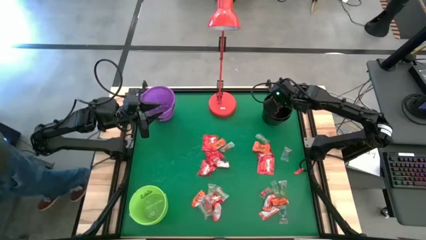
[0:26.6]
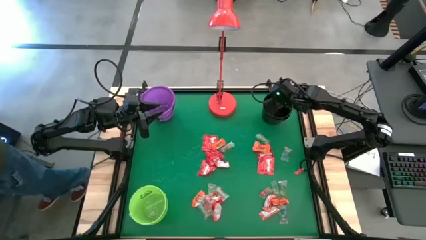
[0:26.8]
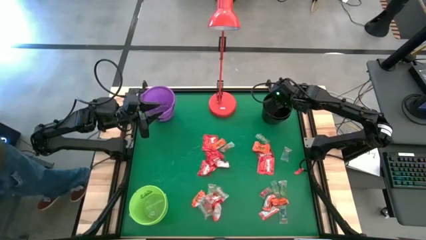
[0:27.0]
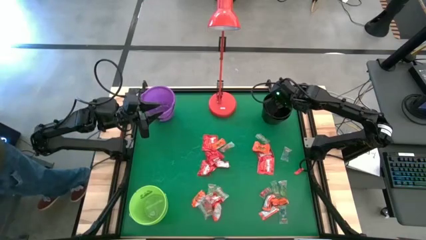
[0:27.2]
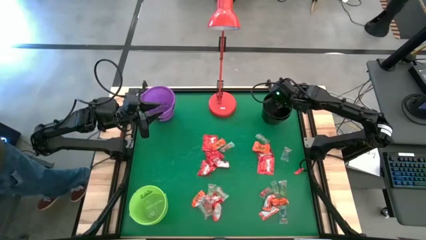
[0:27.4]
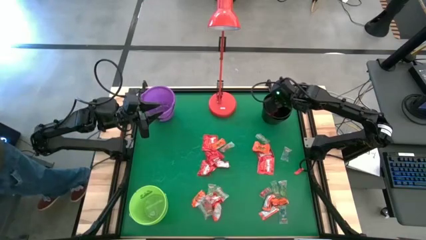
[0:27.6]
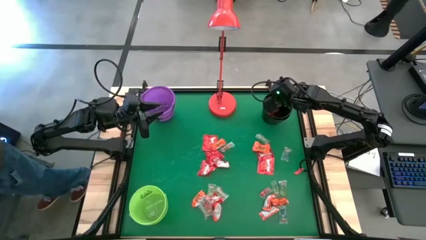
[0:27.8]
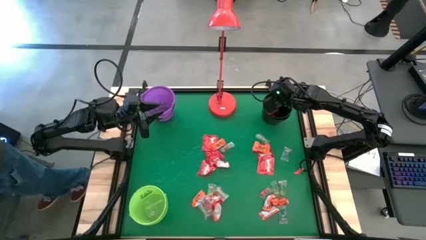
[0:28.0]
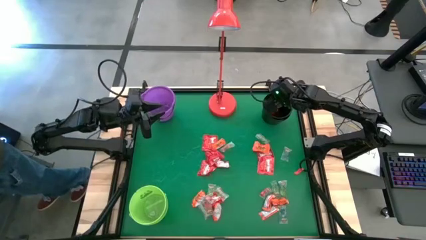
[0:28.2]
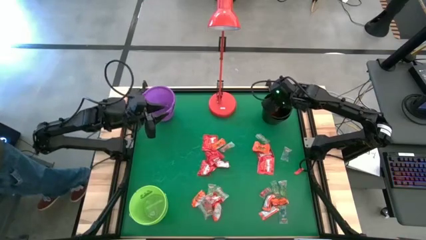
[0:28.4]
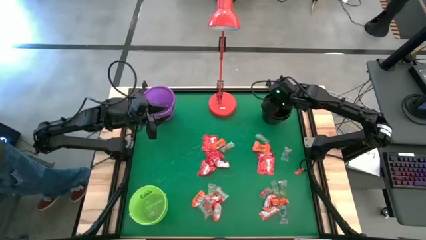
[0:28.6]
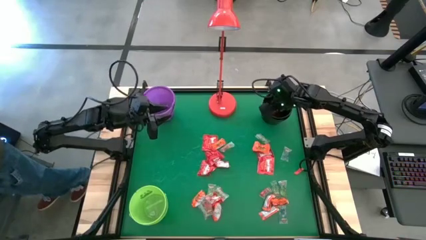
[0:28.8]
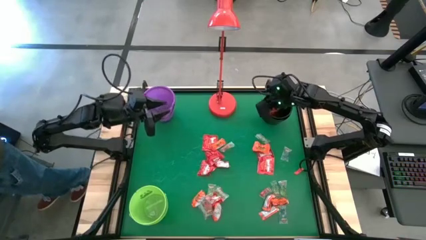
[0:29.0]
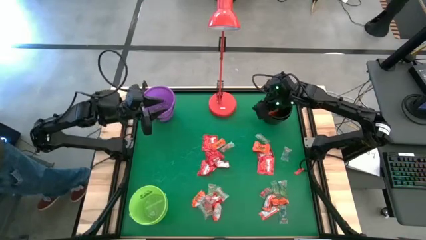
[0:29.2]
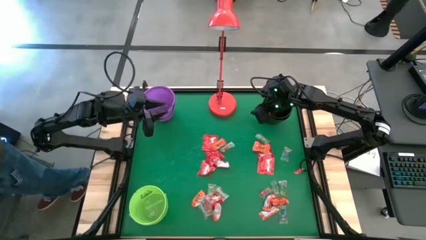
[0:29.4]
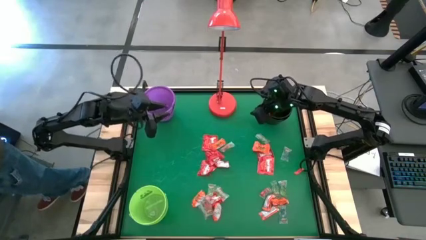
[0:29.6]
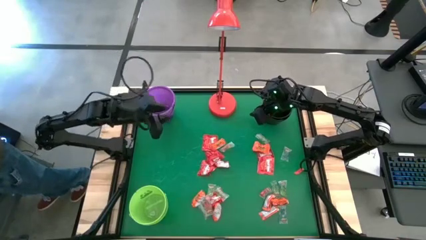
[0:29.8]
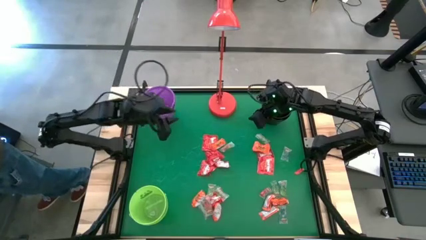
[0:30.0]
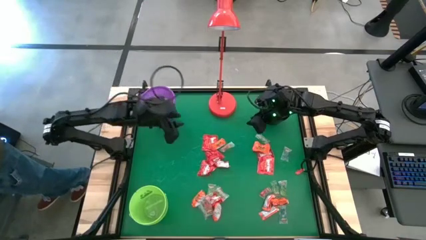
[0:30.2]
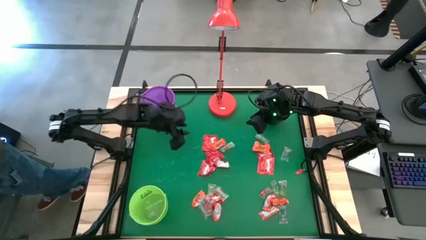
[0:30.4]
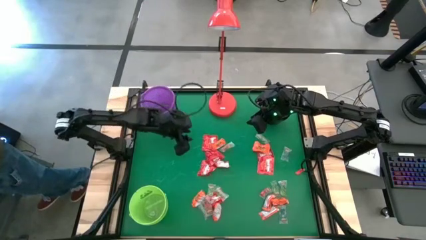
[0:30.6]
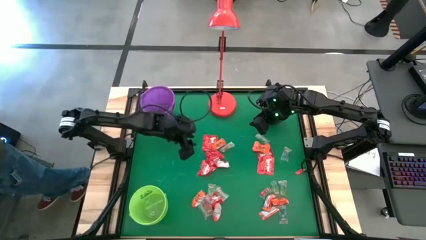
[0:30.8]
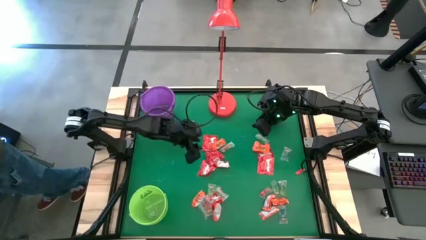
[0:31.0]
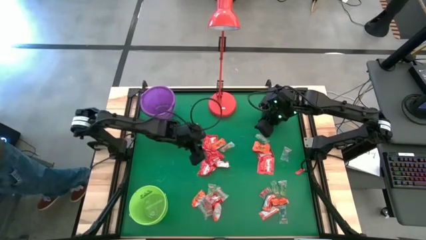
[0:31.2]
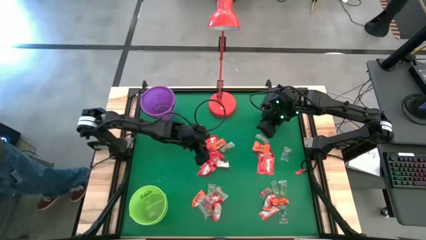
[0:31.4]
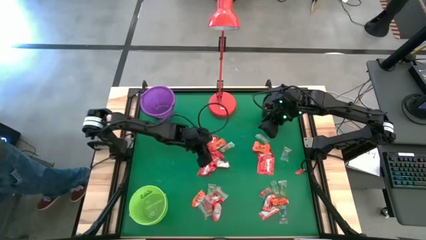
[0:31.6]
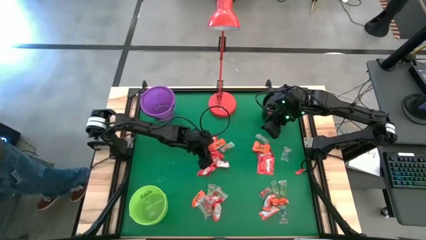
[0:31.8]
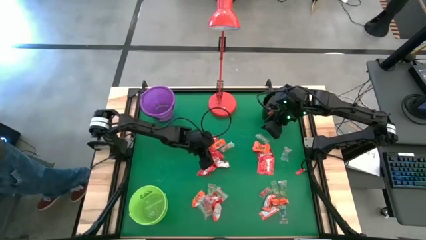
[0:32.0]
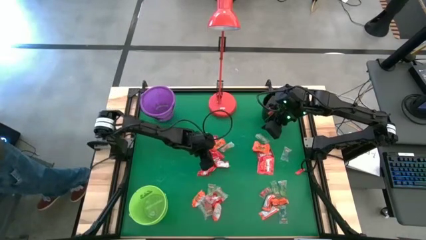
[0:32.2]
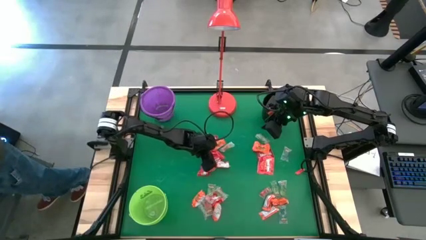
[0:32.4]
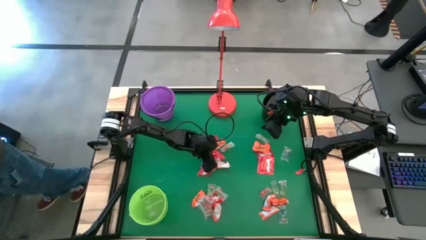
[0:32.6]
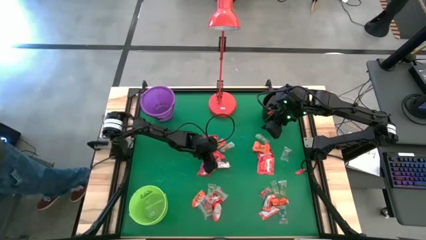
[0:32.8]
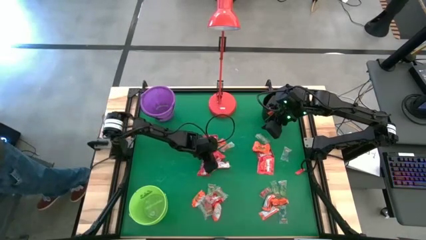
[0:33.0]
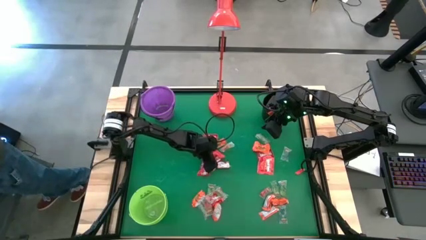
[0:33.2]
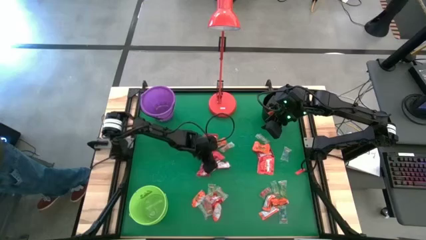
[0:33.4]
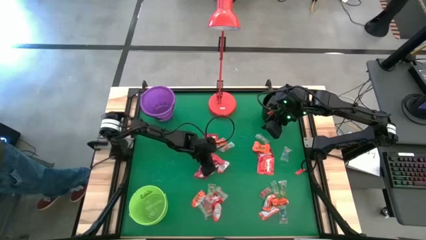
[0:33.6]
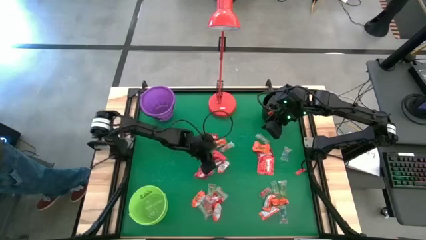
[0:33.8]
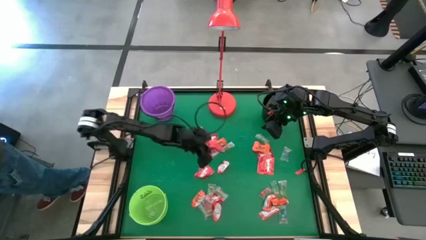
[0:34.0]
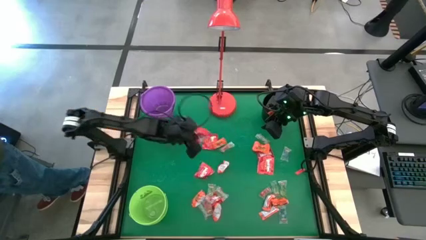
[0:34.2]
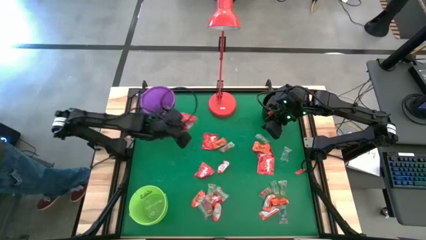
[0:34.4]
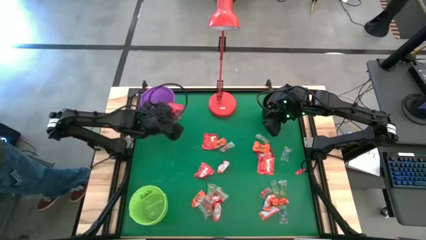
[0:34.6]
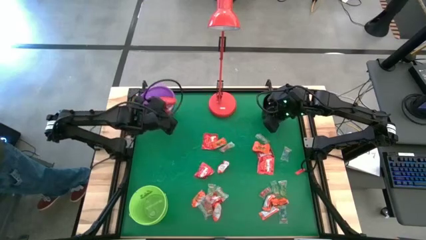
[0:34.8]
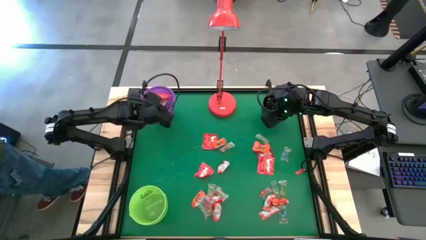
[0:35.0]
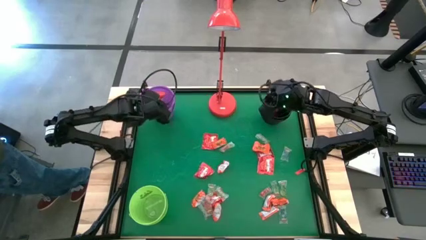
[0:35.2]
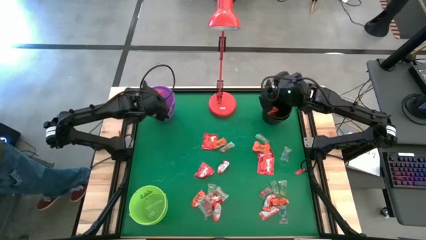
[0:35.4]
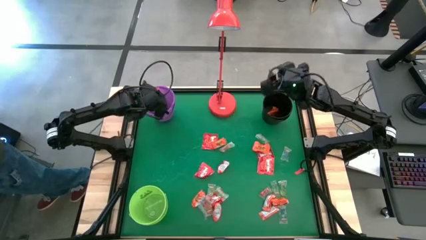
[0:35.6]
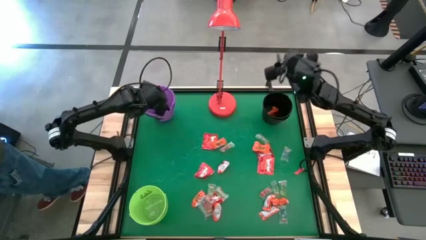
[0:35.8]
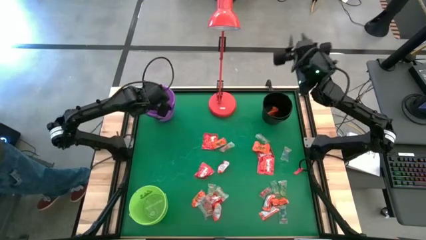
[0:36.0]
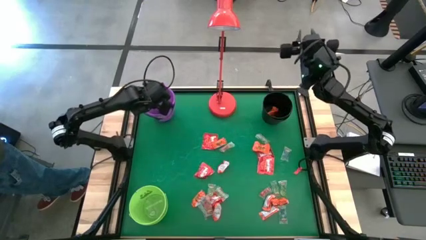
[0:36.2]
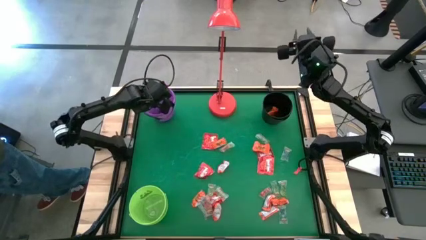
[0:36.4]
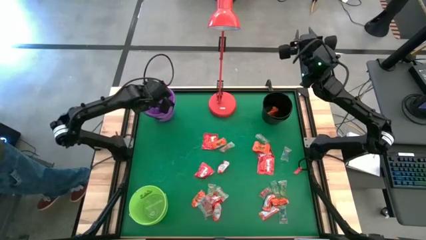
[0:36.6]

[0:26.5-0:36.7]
Task: Sort candy
Put the red candy into the violet bucket
